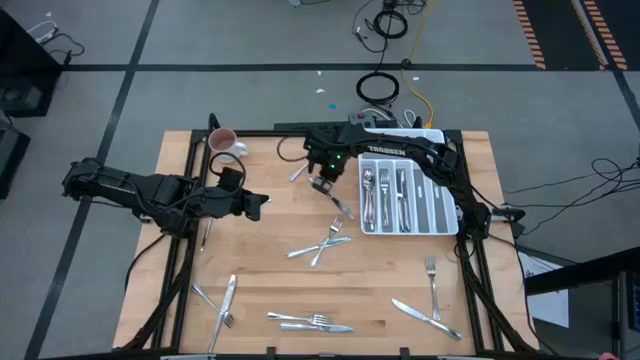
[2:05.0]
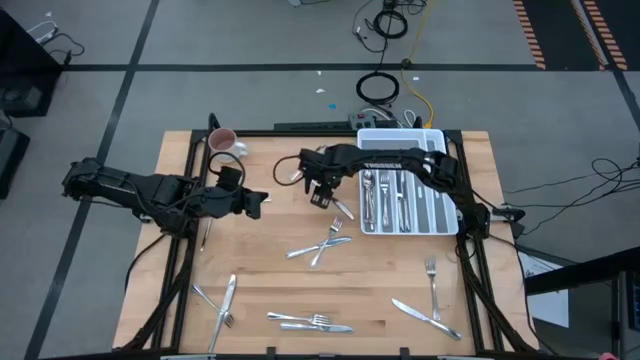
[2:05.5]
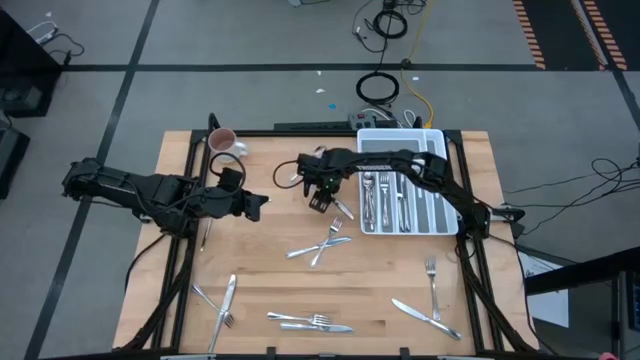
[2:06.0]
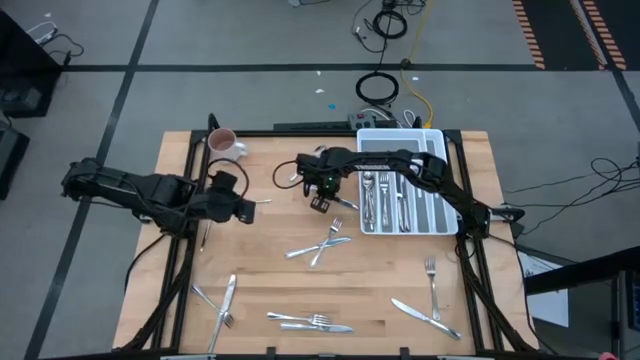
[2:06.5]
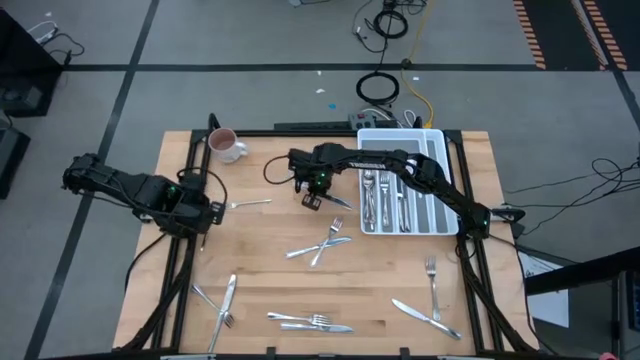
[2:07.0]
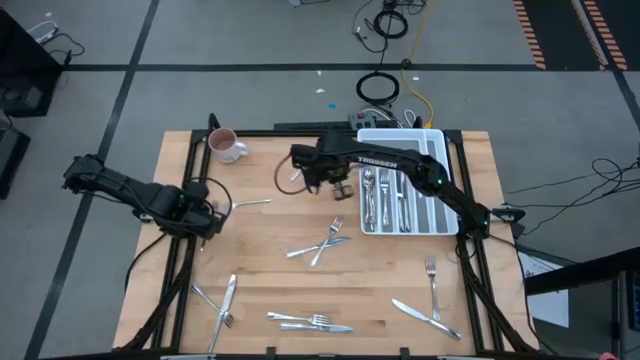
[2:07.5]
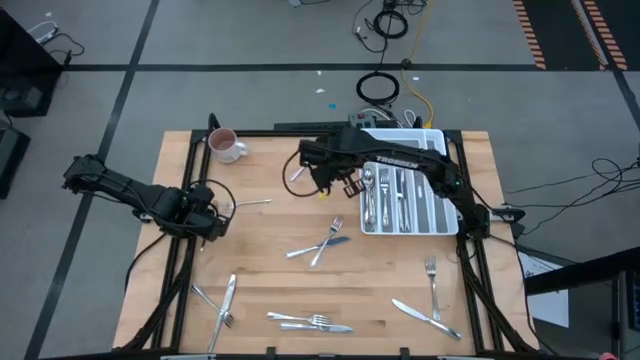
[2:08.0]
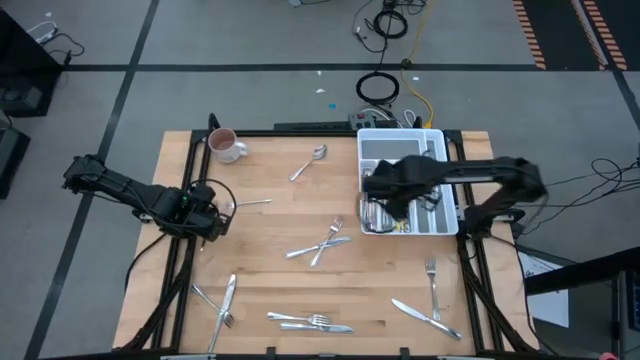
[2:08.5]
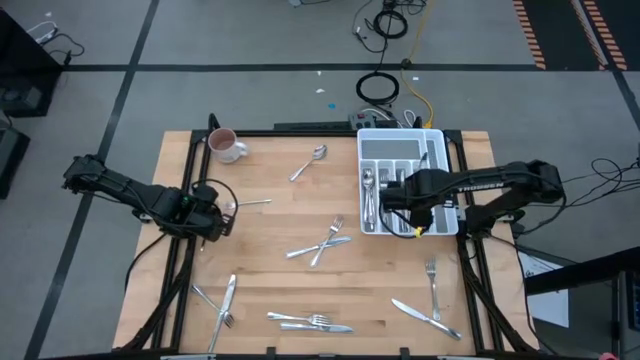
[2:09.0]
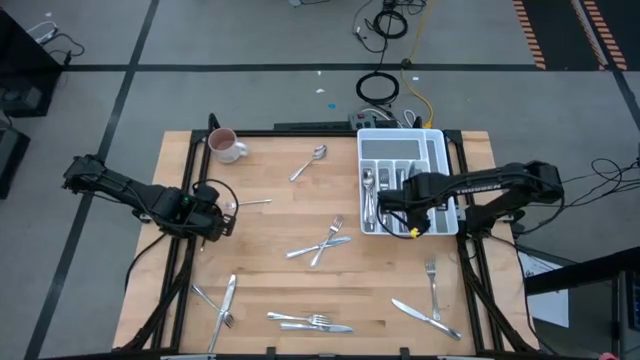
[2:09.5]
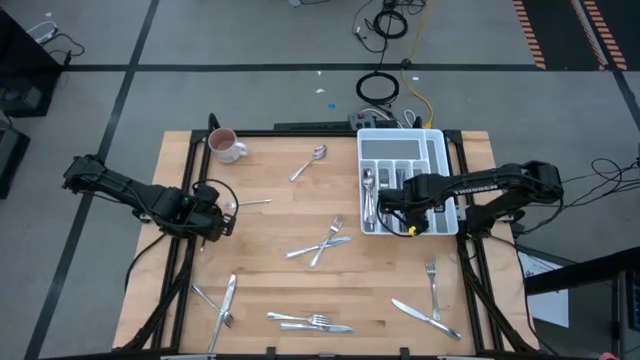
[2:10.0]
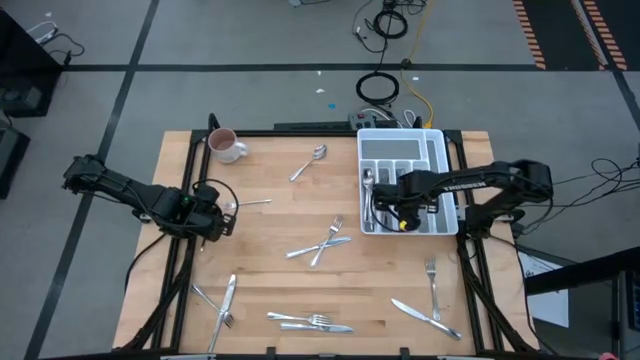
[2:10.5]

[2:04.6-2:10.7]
Task: Sort silverware
Put the silver table knife into the silverware tray

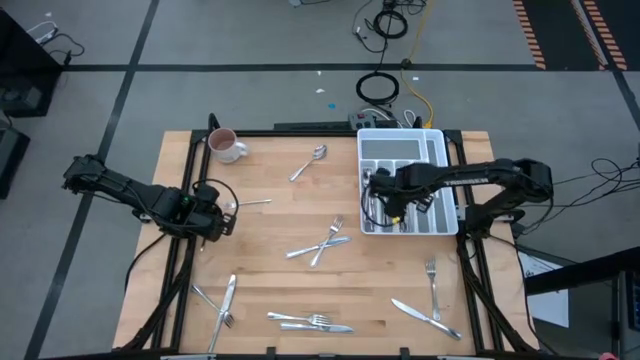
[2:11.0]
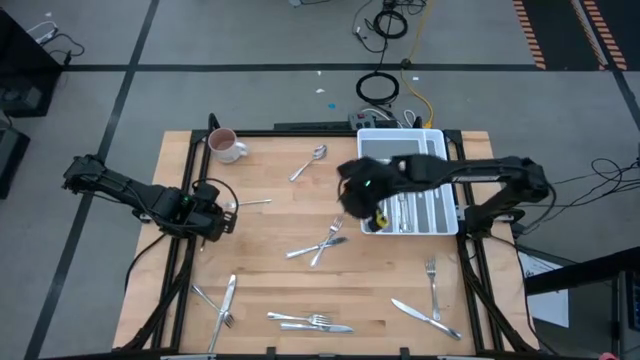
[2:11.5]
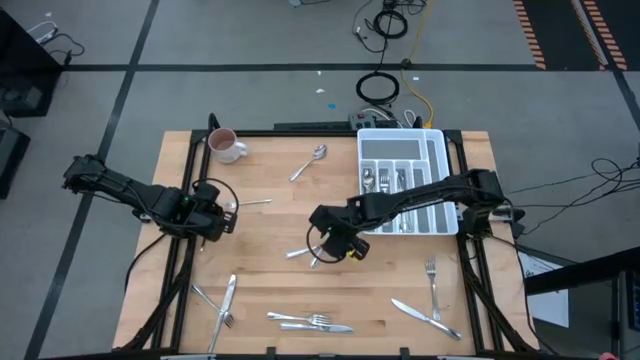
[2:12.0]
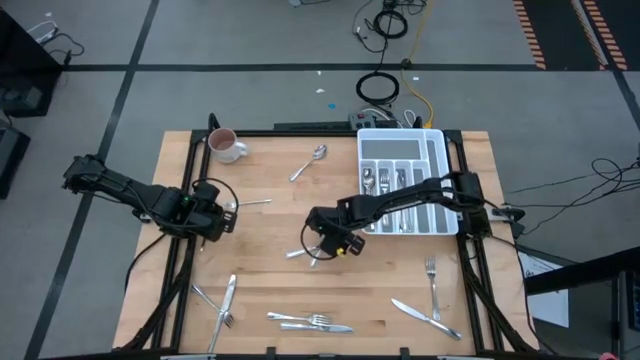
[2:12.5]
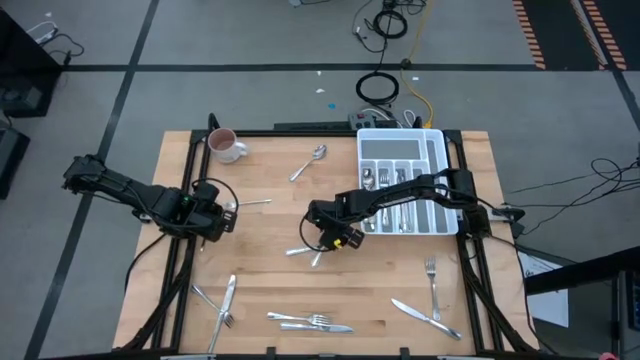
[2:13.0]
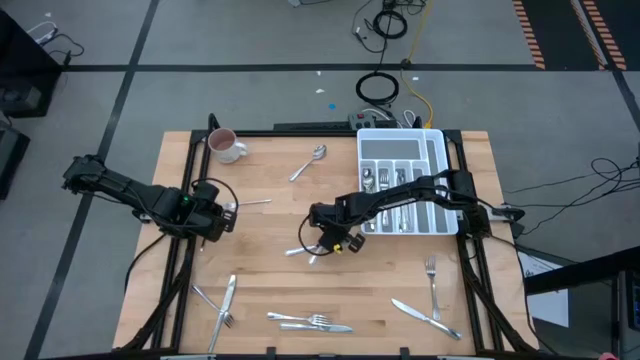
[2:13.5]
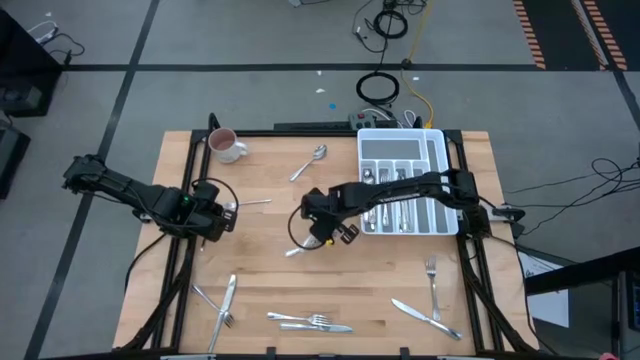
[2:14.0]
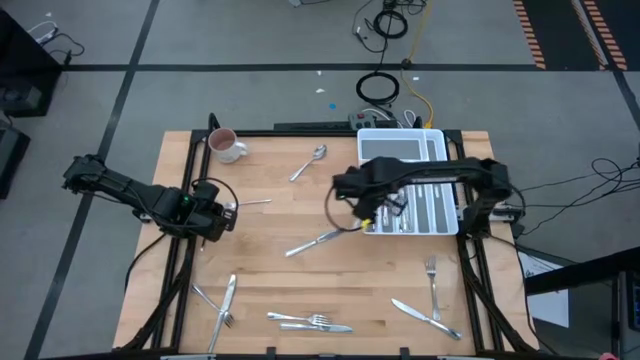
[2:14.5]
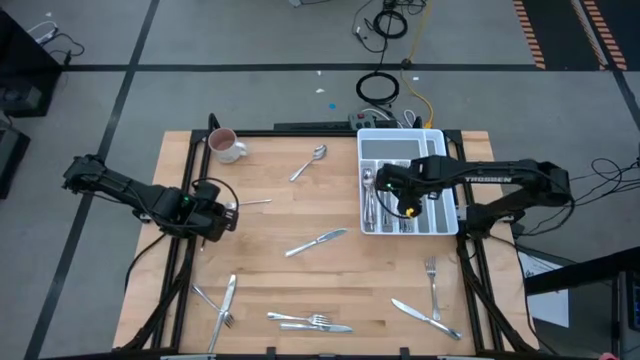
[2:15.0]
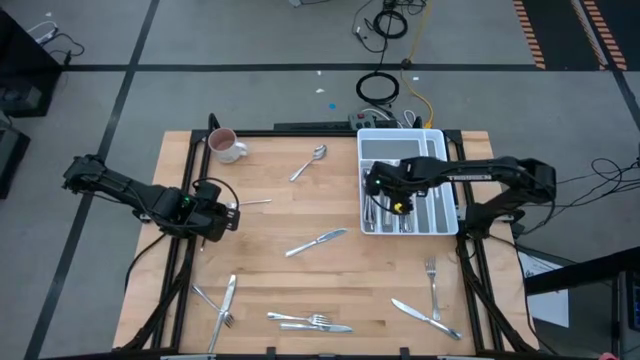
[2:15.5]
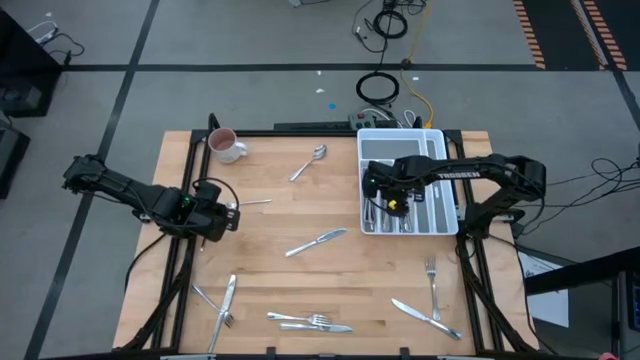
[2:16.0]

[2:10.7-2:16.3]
Put the silver fork into the silverware tray

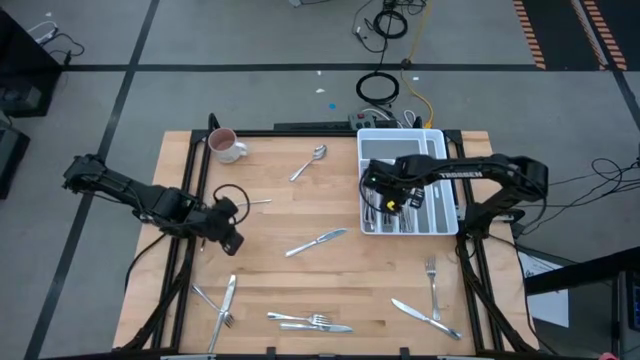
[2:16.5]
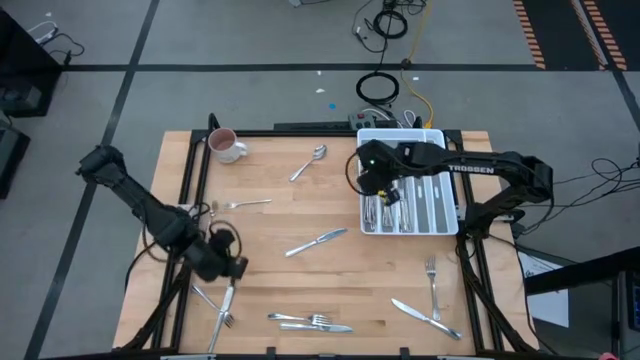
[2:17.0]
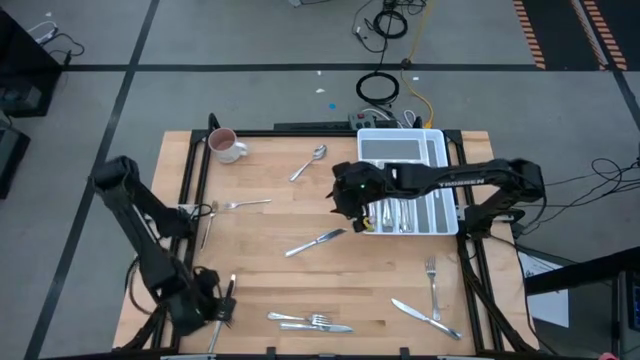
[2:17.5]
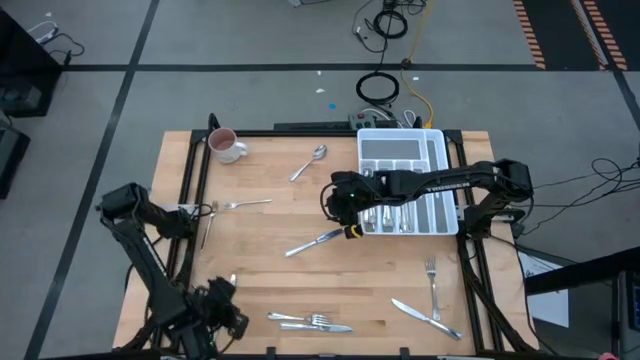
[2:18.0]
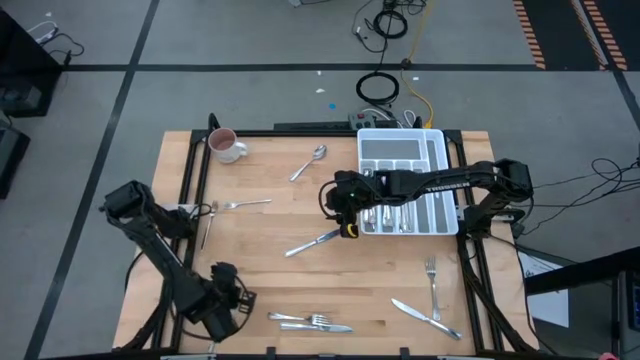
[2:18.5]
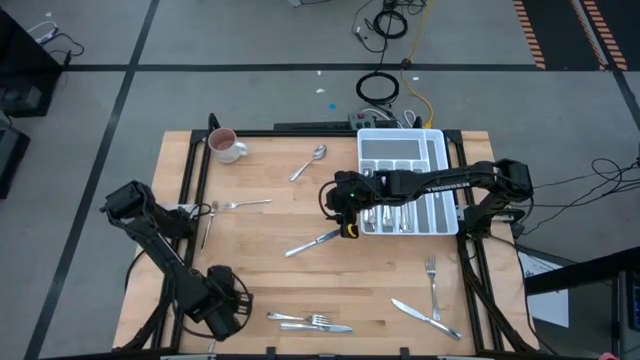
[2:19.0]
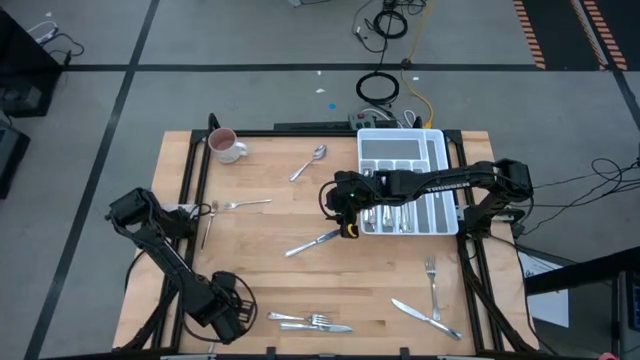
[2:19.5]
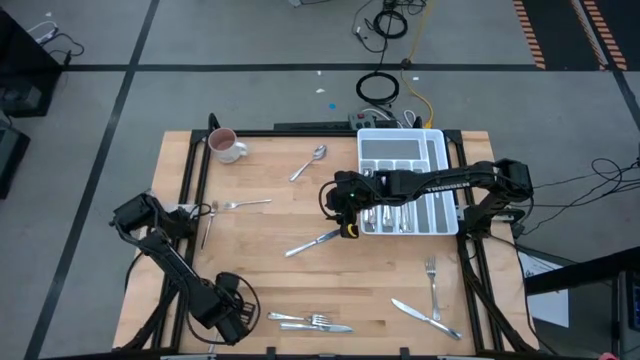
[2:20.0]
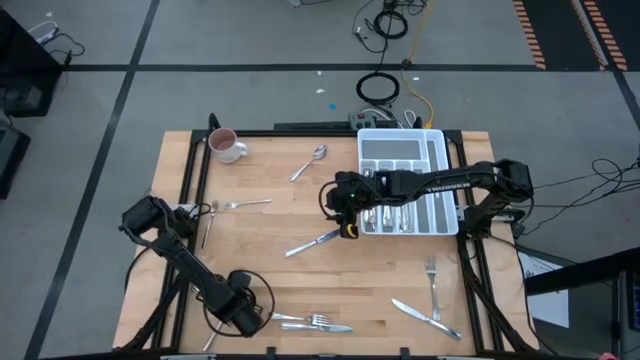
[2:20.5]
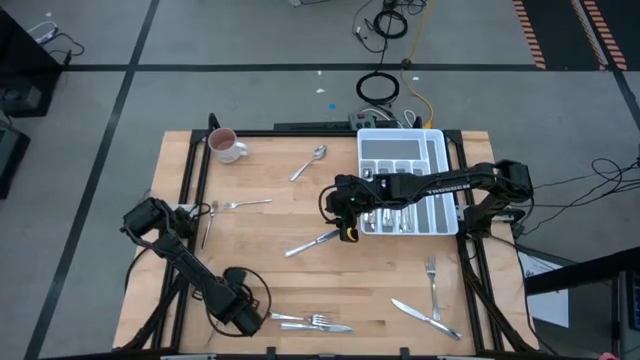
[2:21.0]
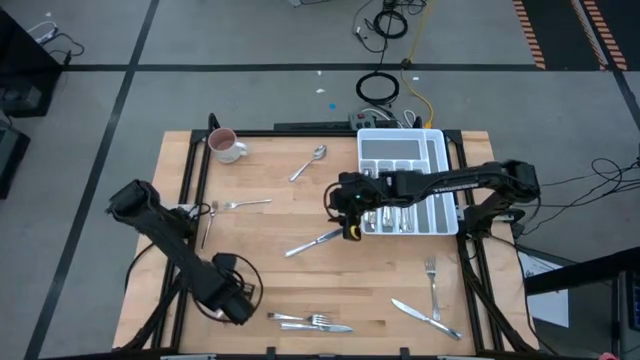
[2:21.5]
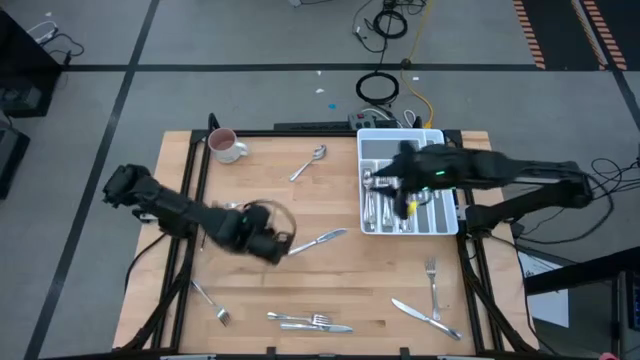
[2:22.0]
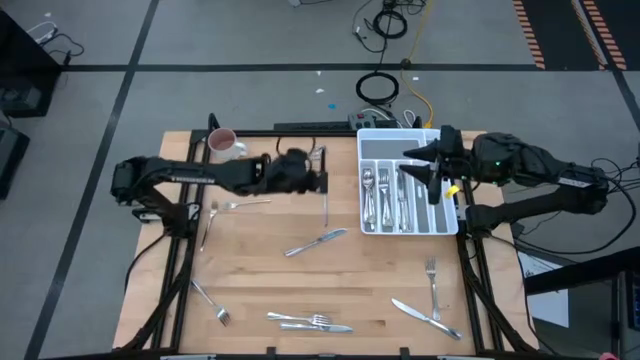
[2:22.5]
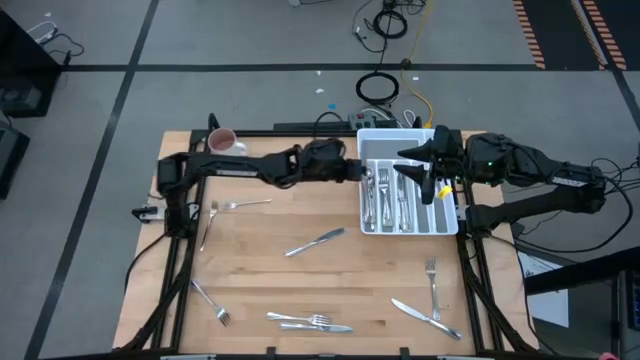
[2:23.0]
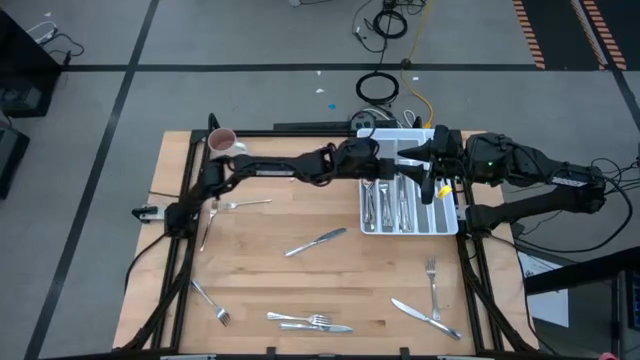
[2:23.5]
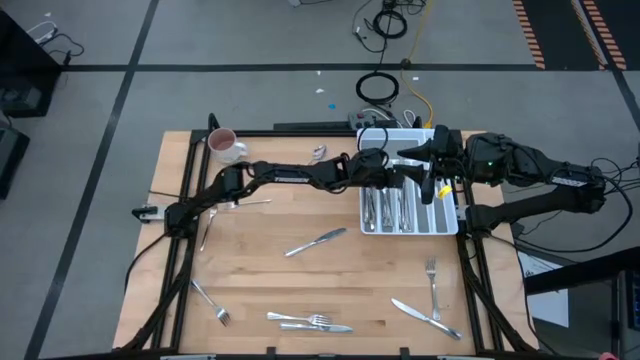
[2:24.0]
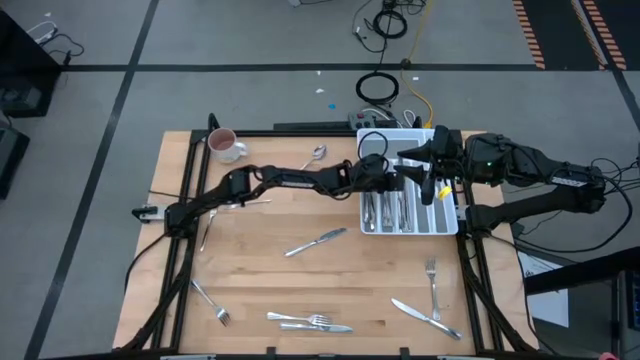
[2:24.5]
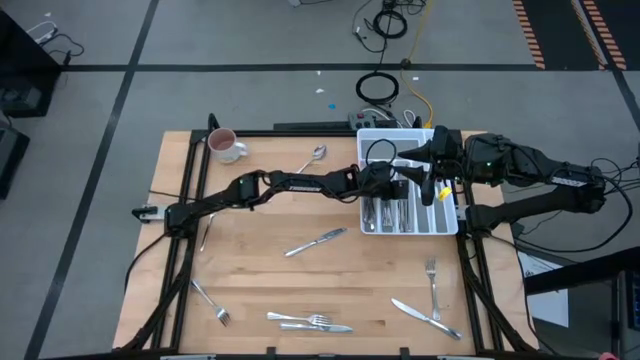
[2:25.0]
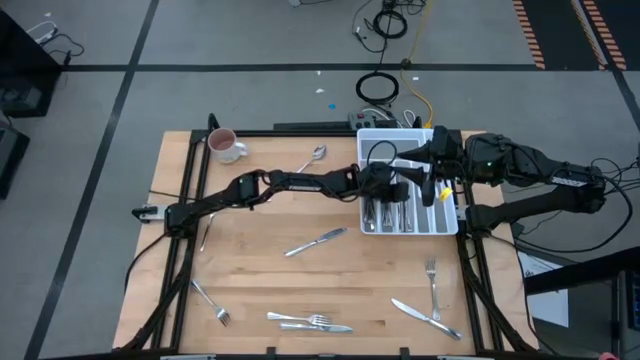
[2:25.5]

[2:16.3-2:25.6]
Put the silver table knife into the silverware tray
